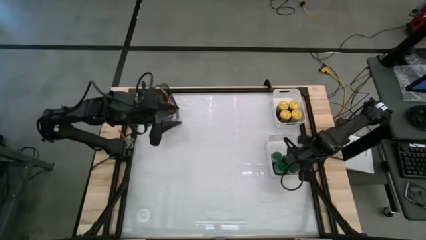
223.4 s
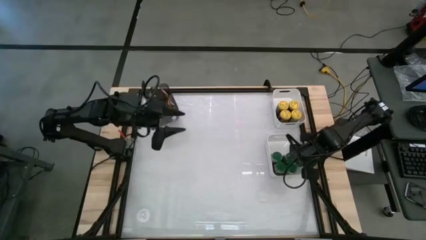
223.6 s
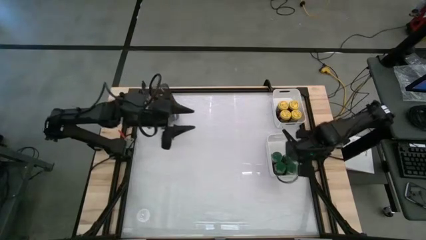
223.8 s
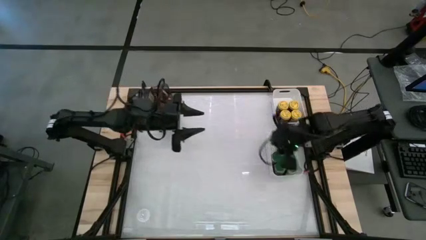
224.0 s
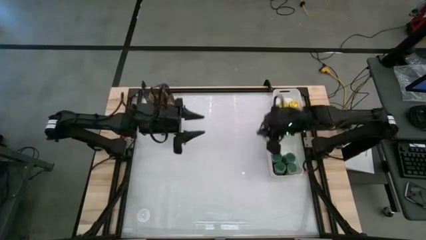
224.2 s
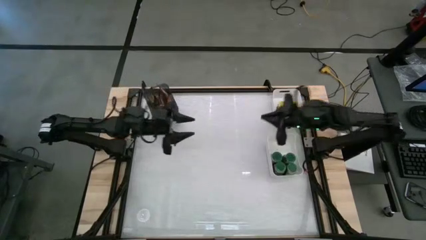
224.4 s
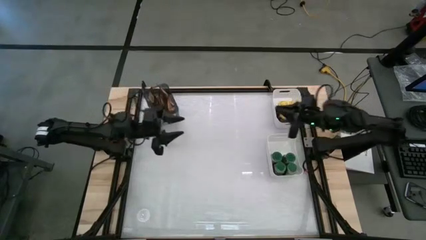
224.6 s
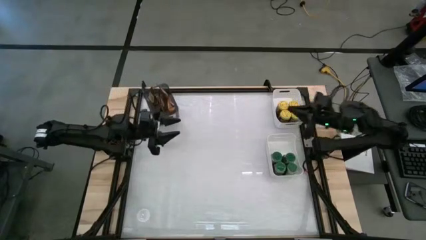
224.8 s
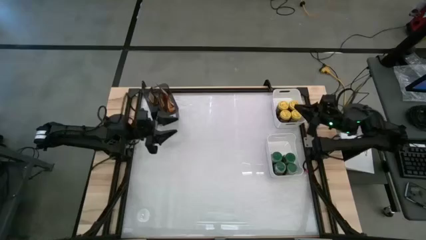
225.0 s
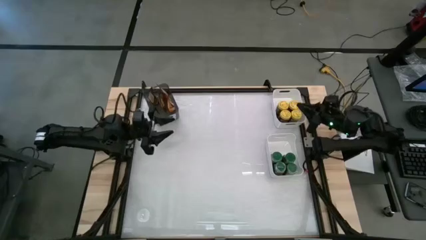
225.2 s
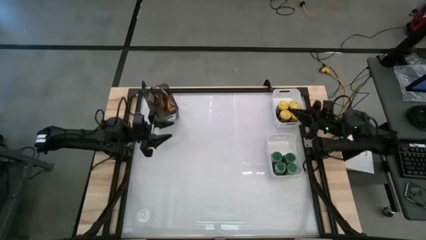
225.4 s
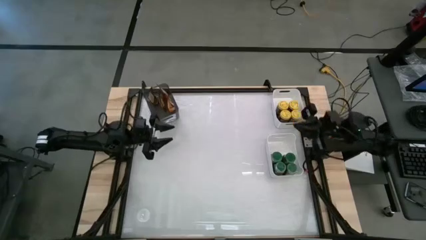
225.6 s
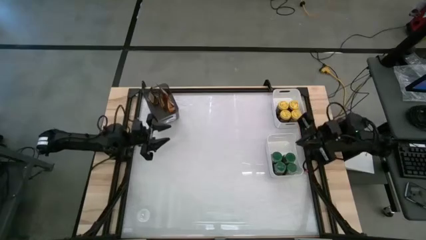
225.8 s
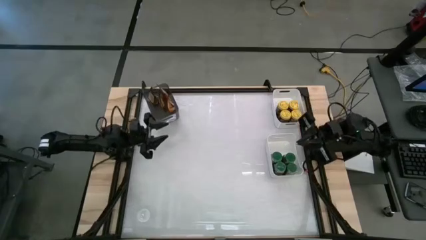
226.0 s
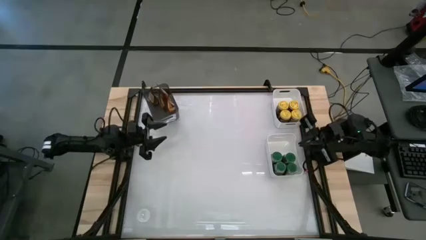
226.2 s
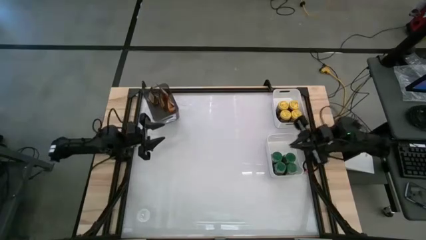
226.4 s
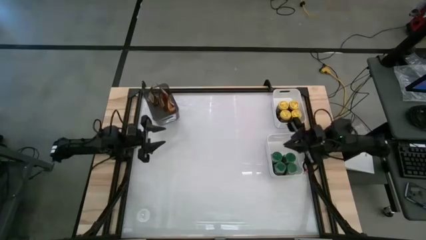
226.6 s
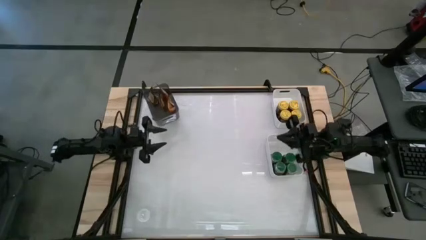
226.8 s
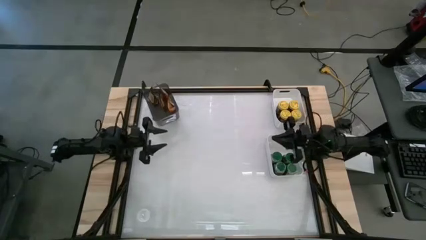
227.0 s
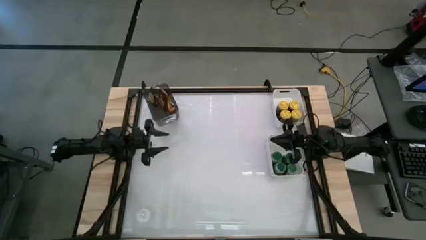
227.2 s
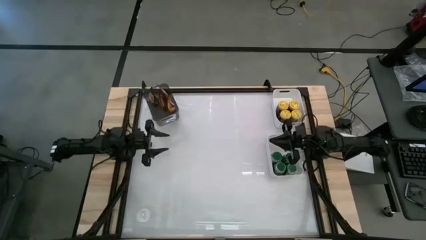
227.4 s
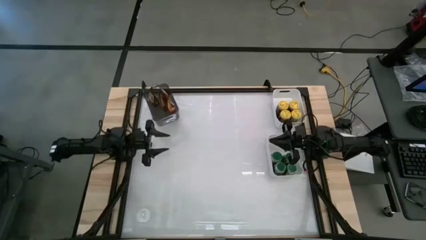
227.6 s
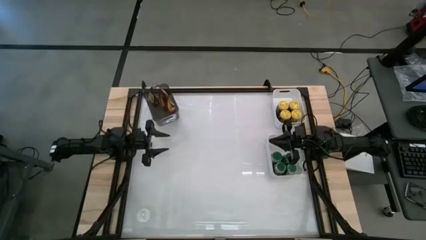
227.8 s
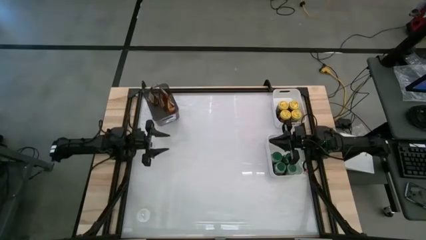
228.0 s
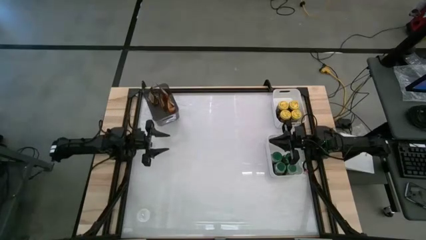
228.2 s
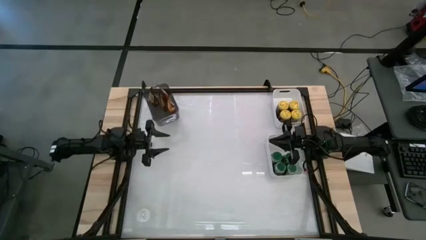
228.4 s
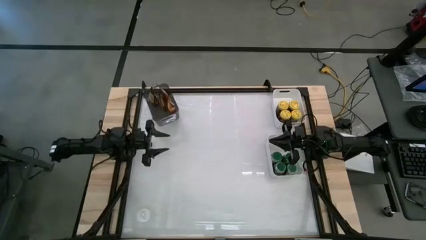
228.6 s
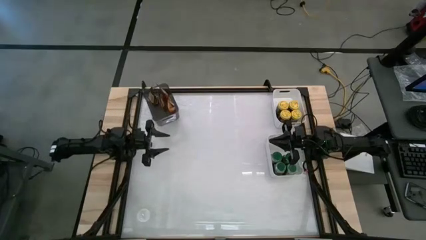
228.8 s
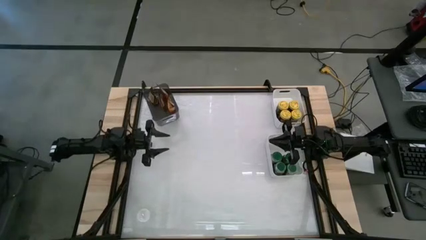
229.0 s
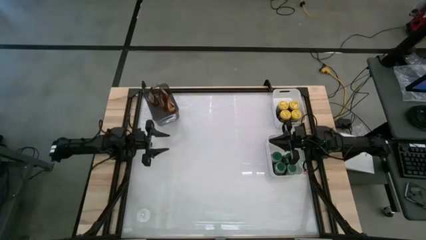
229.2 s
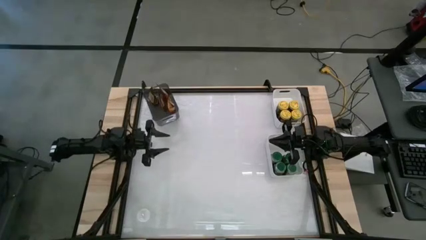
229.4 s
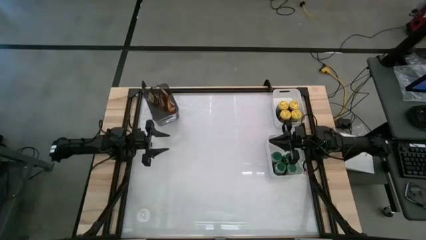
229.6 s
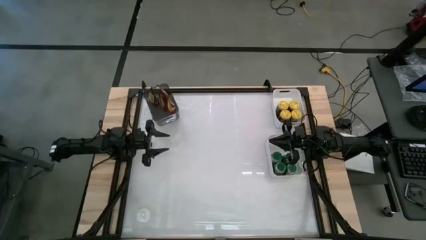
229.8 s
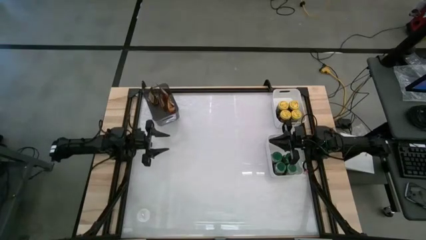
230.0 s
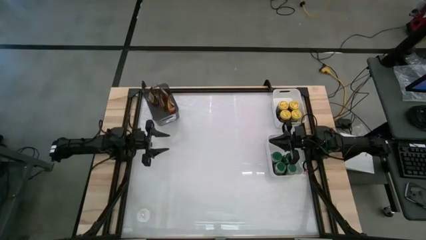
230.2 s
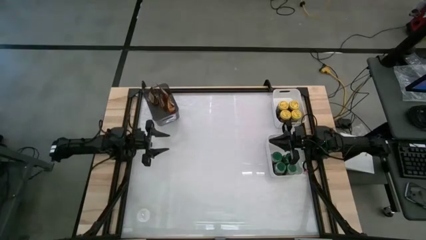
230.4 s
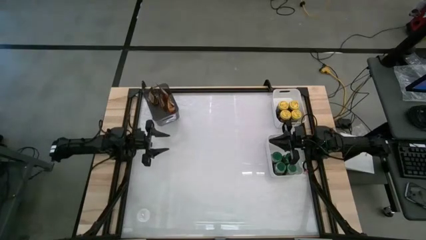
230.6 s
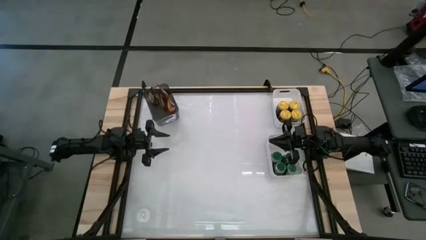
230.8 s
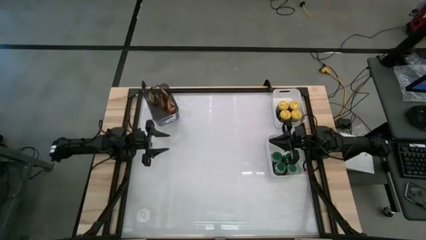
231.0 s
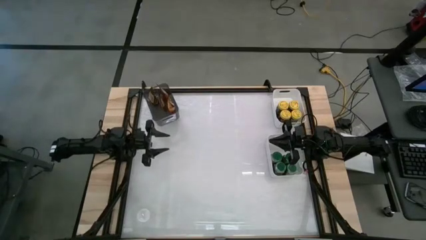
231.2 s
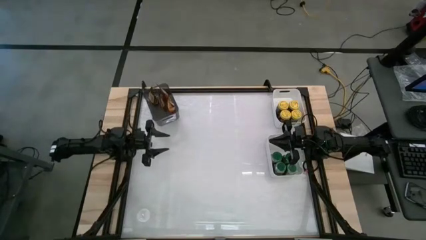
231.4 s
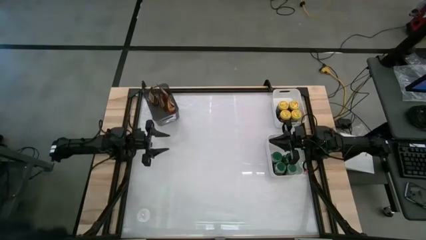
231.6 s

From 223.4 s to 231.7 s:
Task: Sort spices by type
Return to Home Position

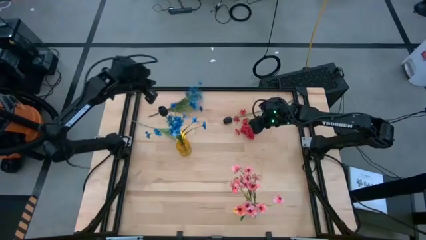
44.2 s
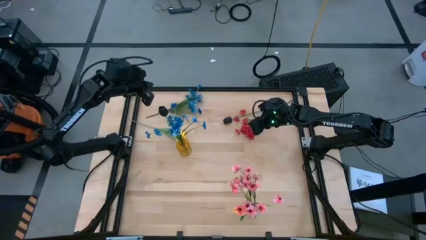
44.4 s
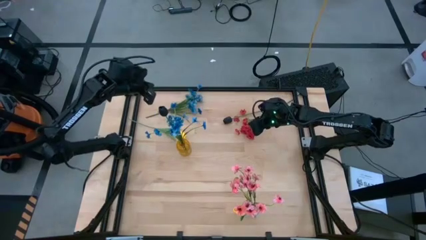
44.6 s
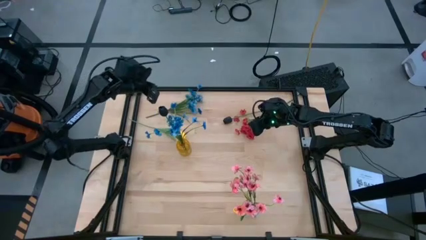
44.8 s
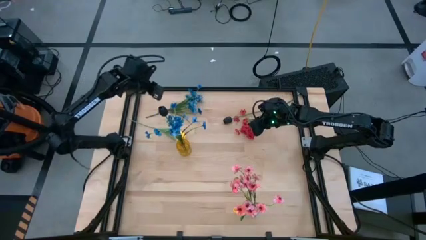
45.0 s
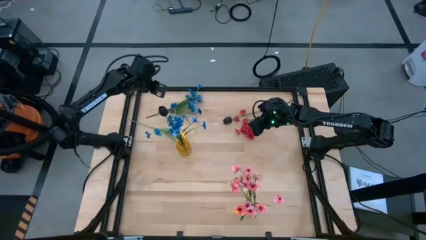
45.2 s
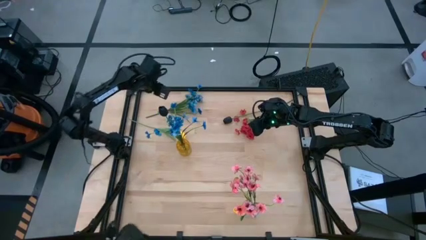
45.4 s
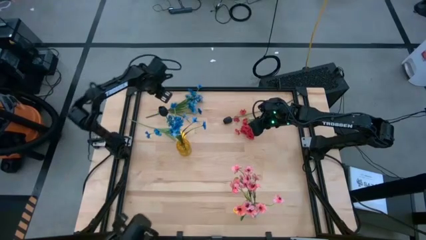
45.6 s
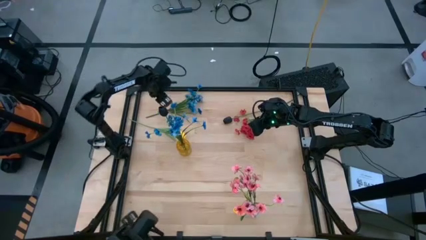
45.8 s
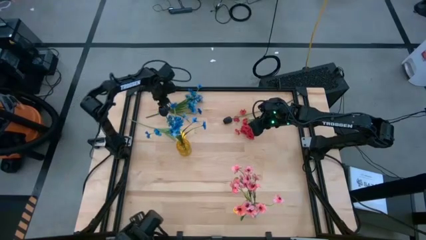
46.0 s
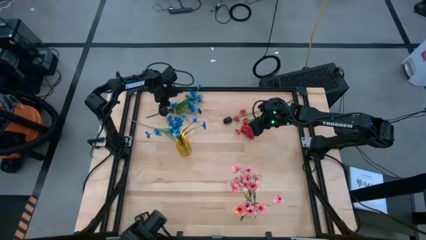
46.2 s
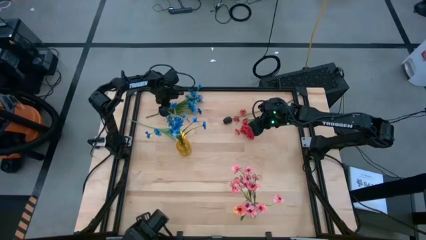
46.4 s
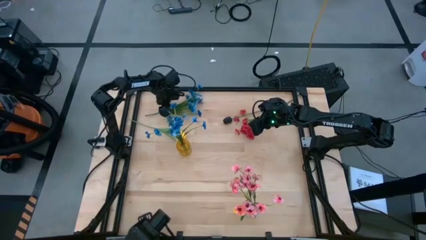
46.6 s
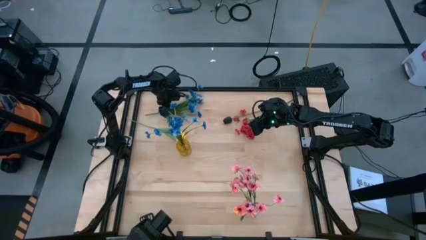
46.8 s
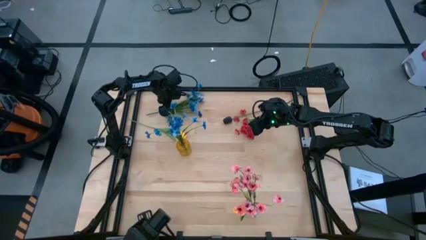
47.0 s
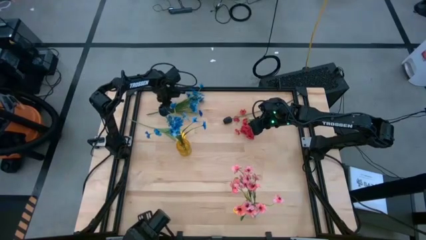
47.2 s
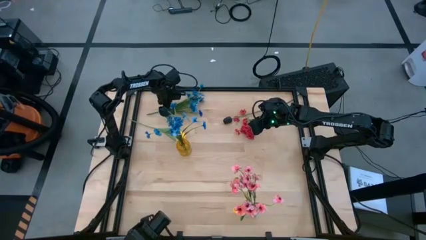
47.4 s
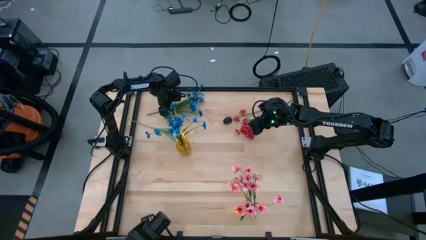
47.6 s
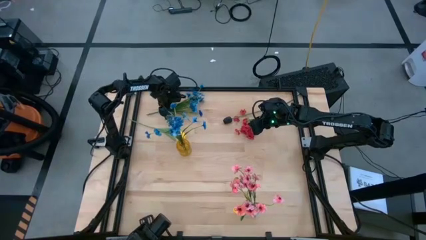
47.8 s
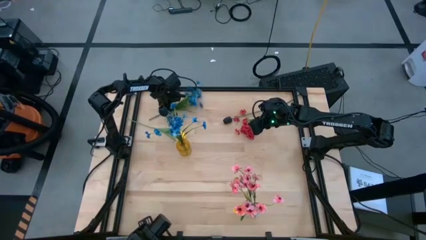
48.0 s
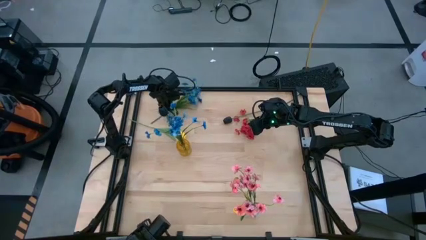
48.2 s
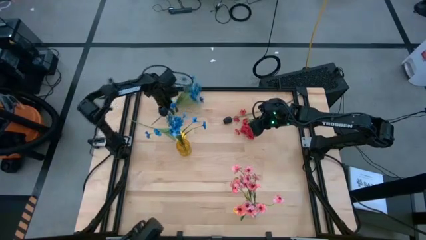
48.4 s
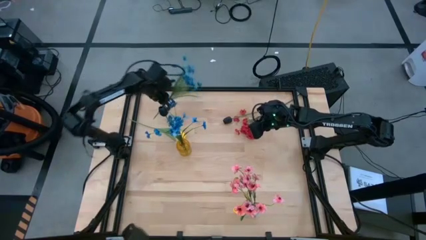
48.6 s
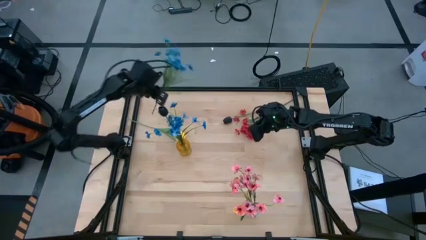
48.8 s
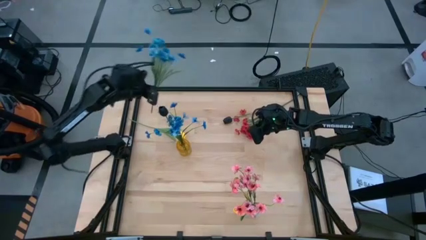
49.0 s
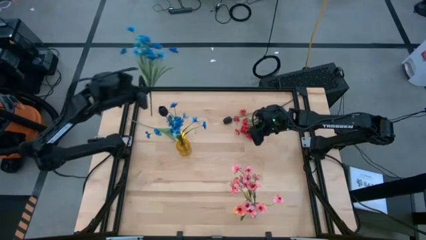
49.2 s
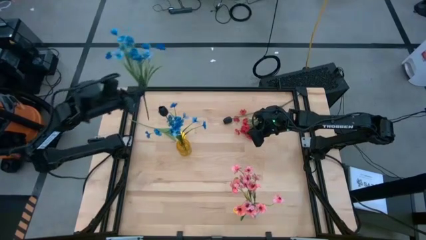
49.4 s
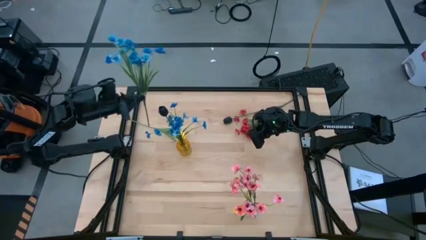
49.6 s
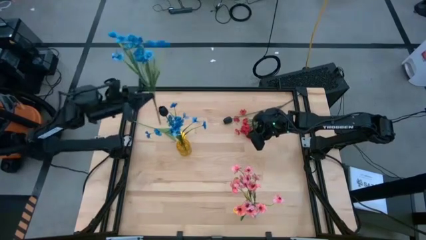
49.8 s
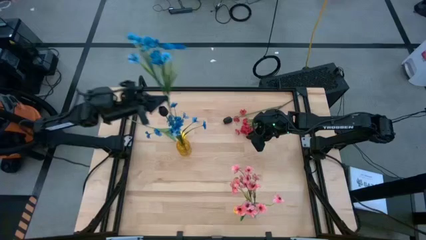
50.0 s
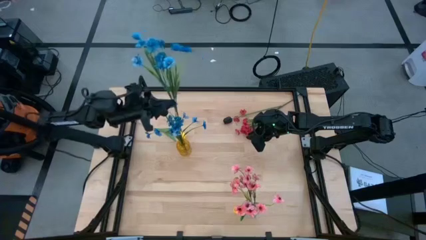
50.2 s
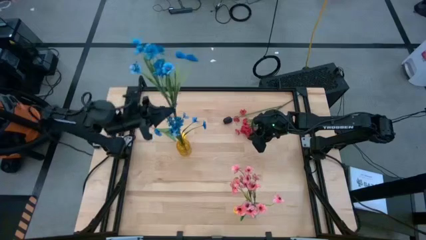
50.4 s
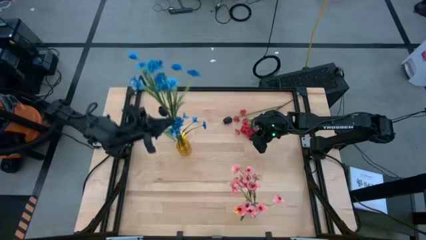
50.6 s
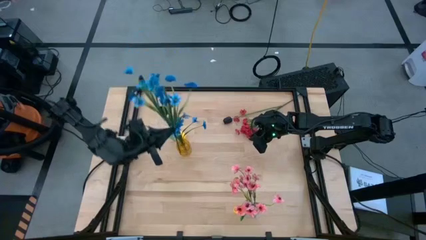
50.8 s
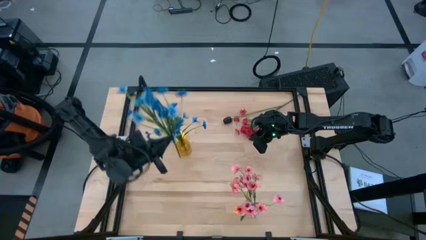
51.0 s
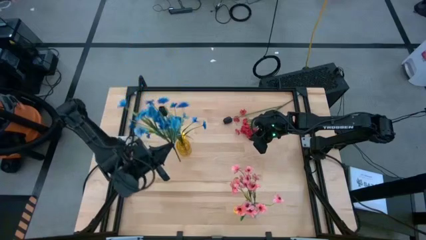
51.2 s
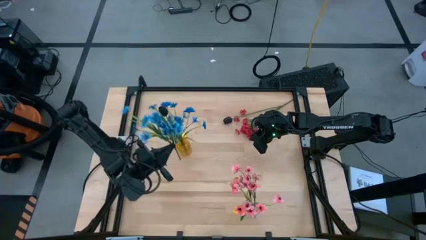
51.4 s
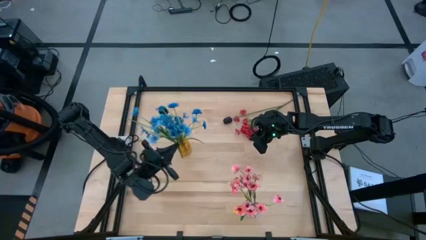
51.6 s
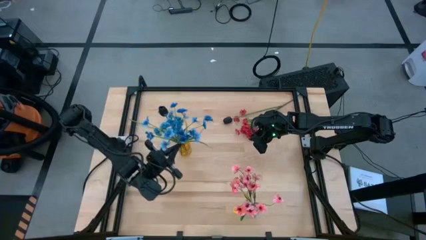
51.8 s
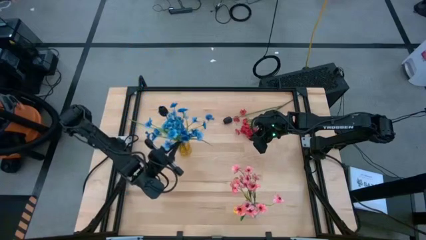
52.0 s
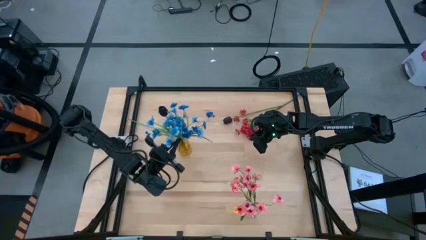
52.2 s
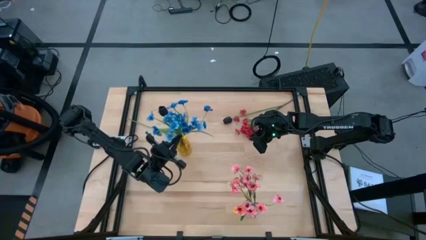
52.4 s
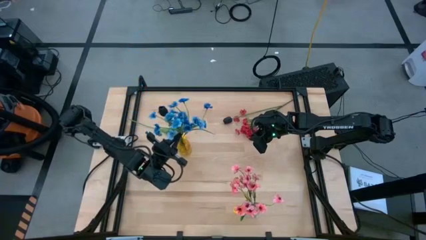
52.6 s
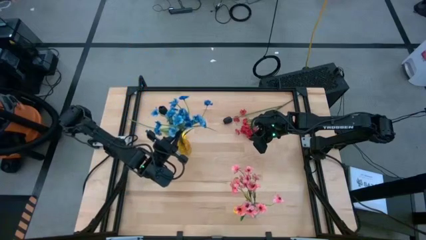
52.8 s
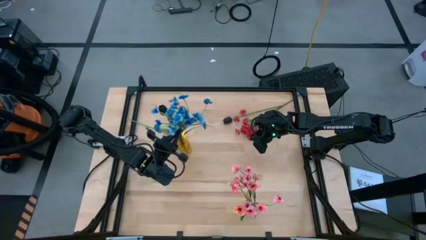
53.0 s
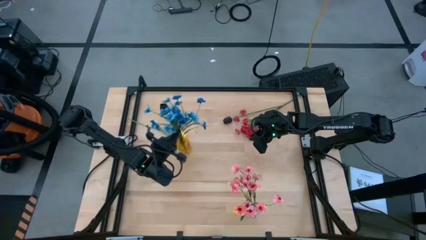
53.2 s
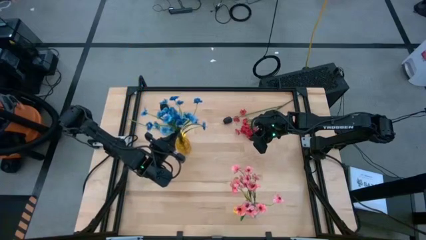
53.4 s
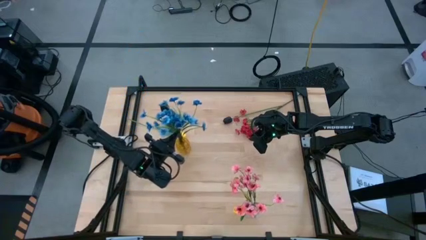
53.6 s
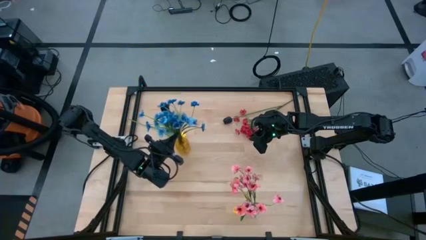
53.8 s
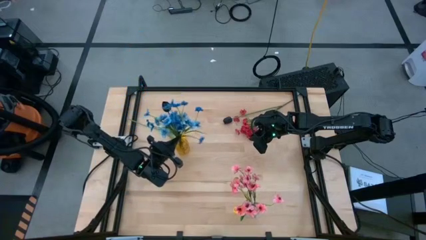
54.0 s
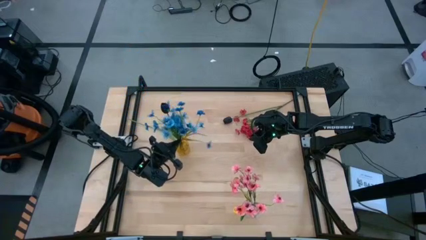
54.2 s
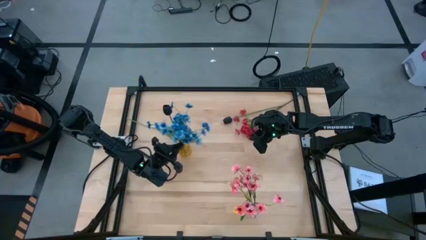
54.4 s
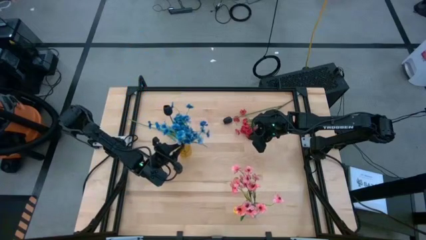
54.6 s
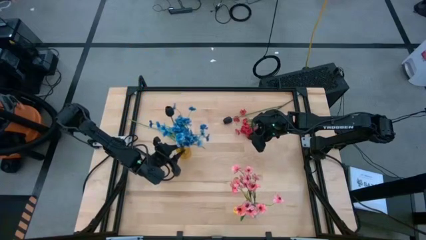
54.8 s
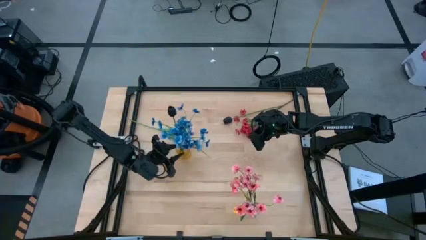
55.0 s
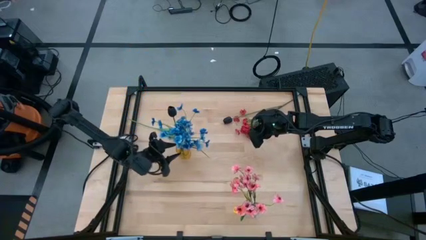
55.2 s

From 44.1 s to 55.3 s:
Task: Sort flowers into vase by color
Put the blue flowers into the yellow vase
